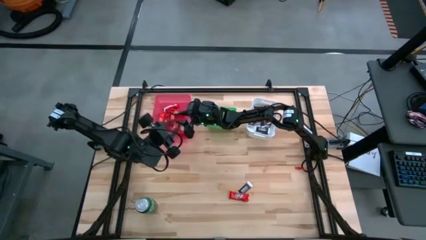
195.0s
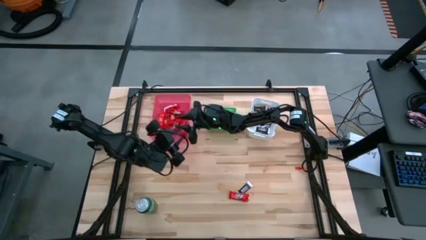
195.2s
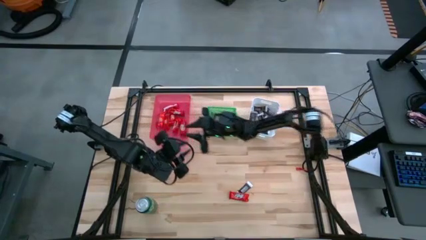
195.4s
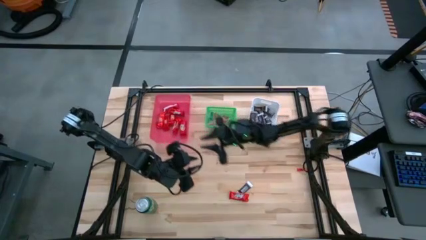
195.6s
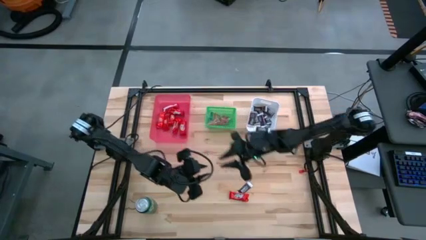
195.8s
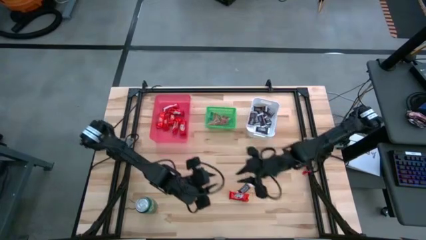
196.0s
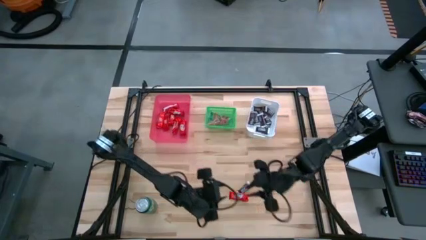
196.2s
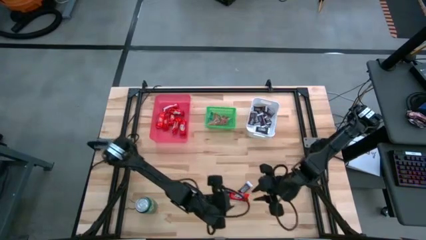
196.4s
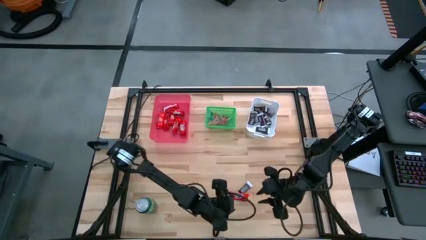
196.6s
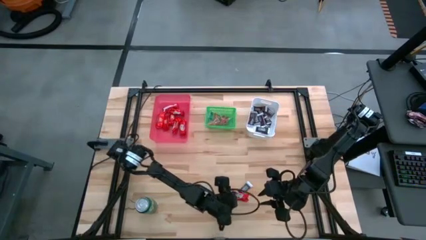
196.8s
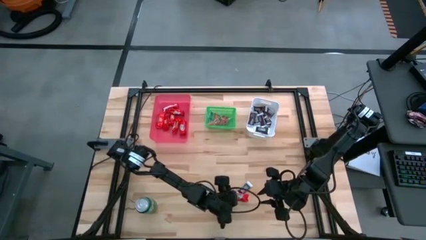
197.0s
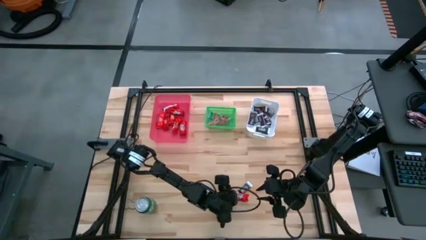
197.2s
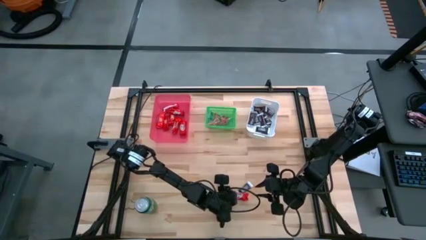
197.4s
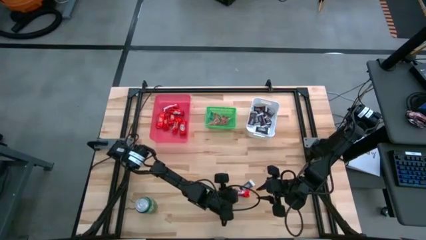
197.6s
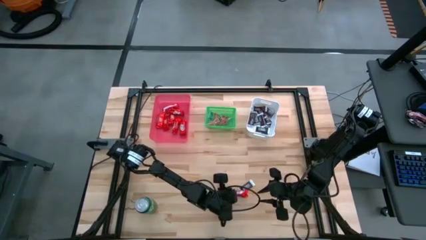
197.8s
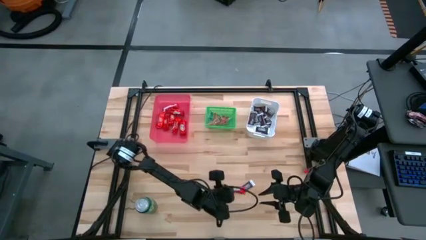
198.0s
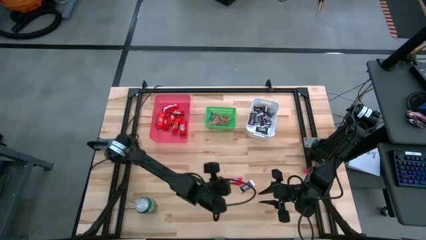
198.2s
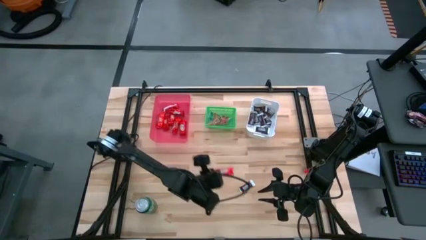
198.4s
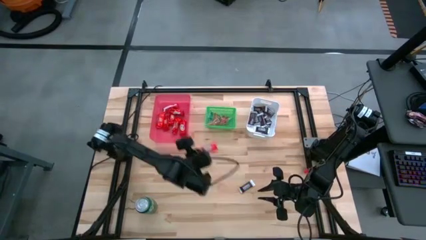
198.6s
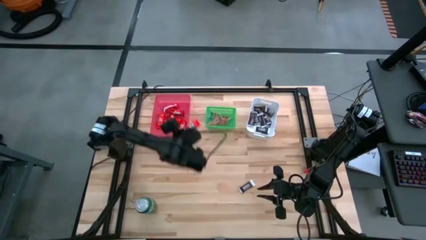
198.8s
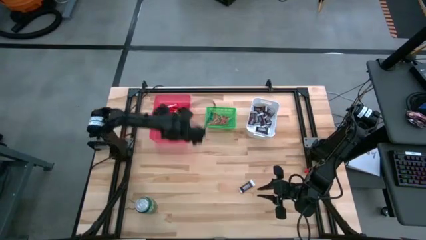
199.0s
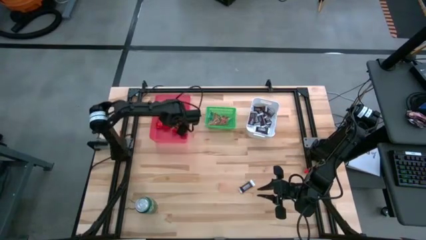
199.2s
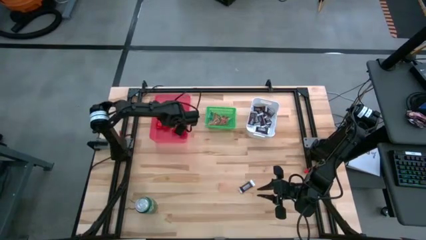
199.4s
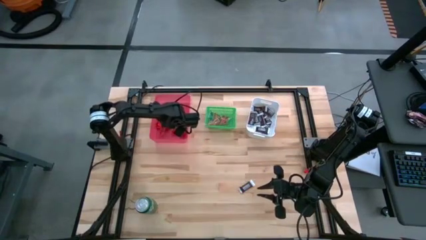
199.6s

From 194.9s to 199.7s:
Task: Sort candy
Put the red chocolate bar into the pink bin

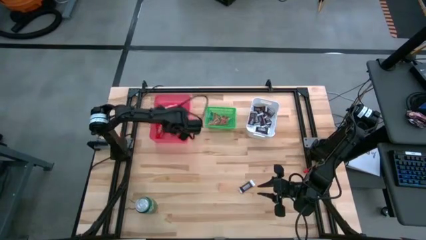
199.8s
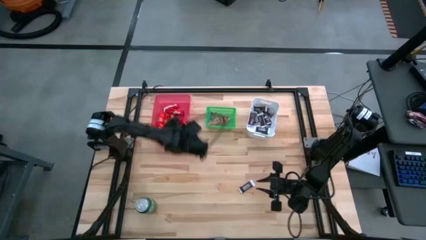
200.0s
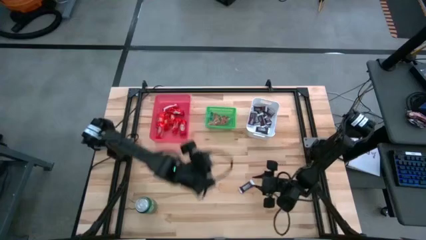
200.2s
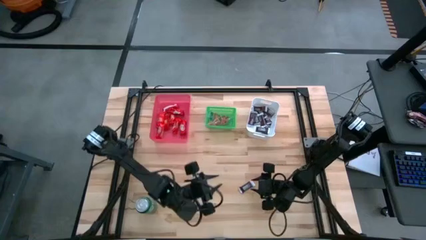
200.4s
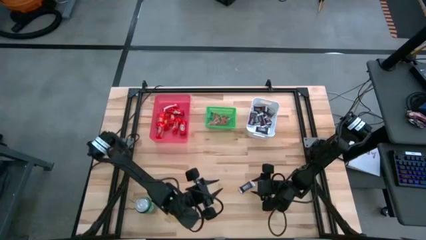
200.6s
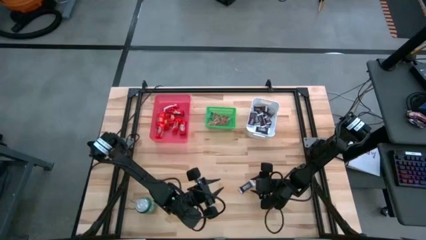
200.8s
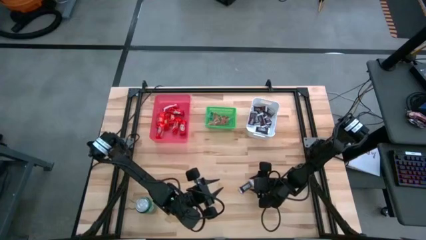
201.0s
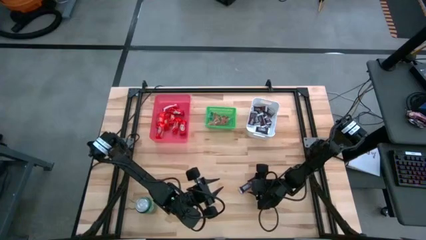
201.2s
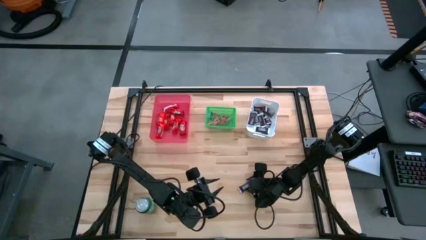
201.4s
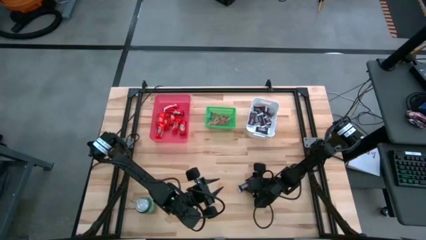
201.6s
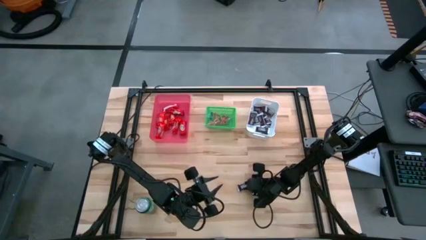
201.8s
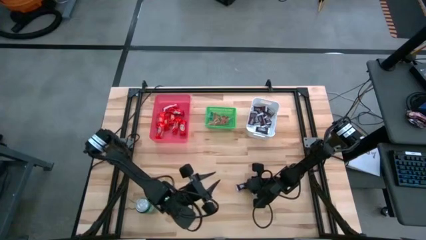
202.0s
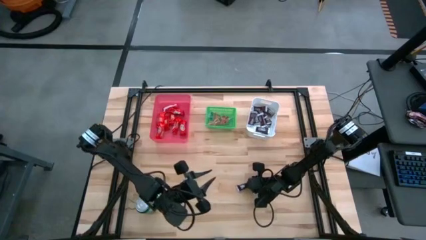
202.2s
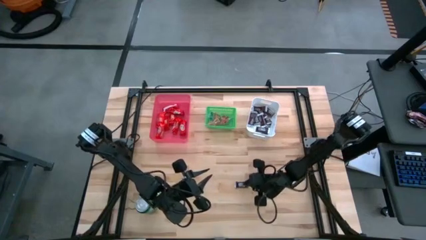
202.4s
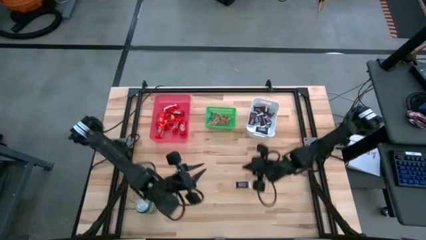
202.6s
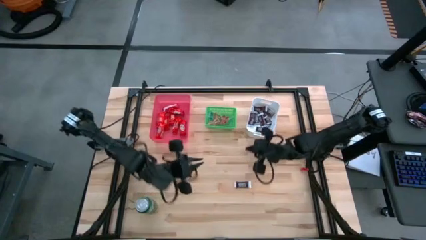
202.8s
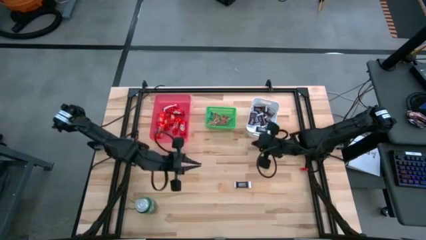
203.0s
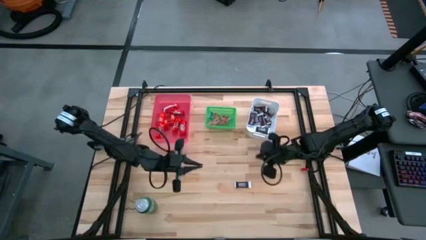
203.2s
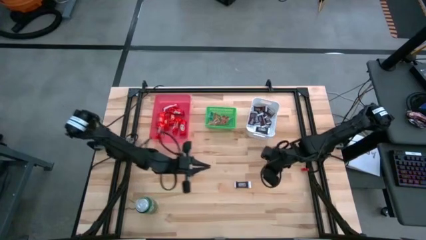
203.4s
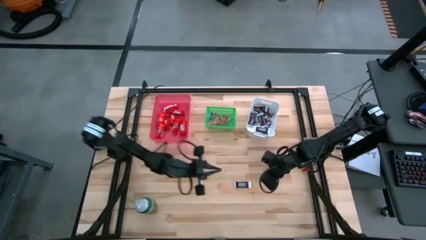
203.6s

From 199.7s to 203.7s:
Put the brown chocolate bar into the white bin

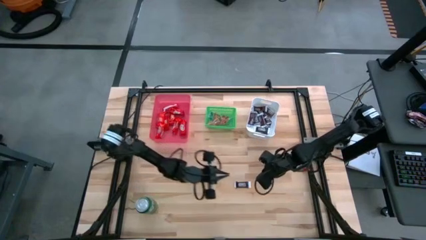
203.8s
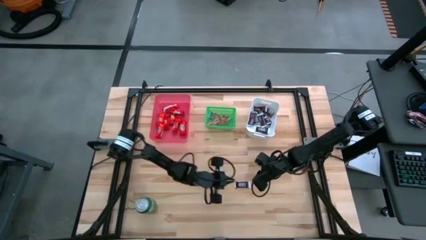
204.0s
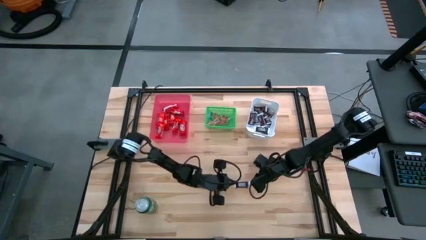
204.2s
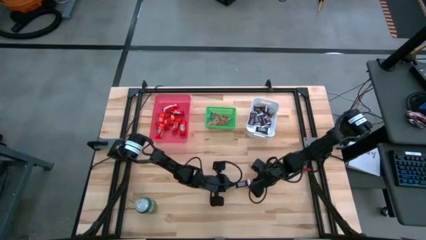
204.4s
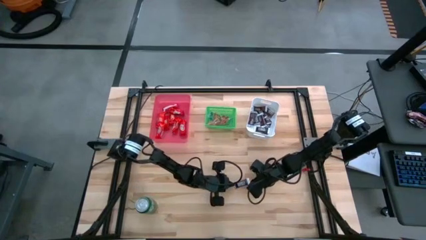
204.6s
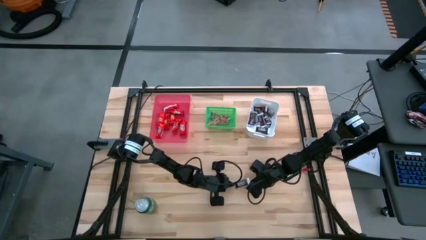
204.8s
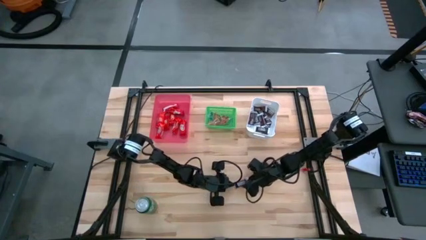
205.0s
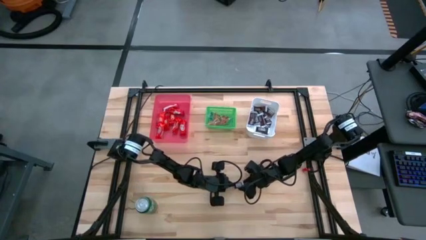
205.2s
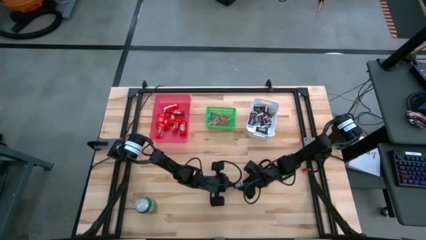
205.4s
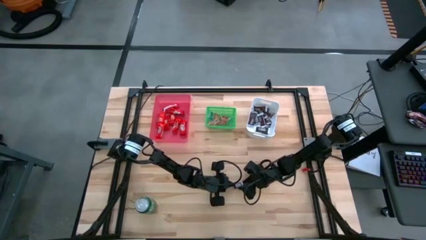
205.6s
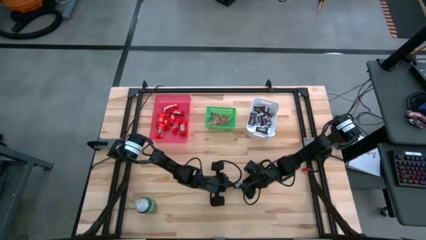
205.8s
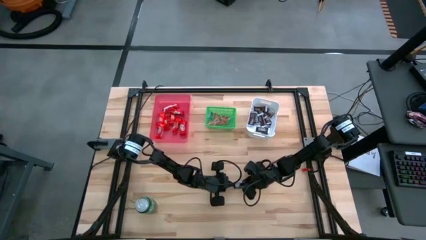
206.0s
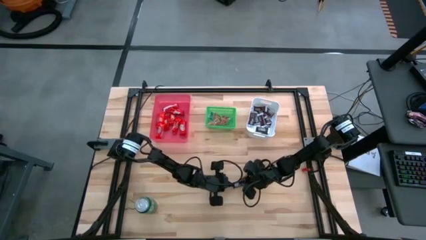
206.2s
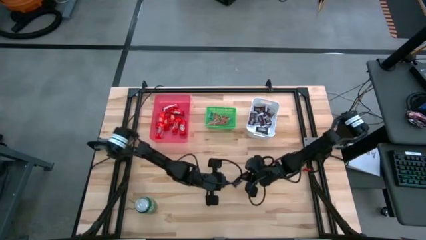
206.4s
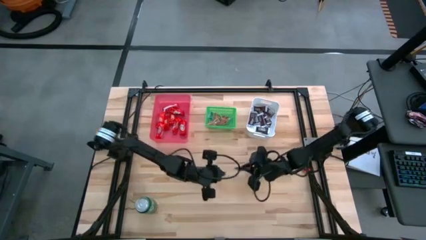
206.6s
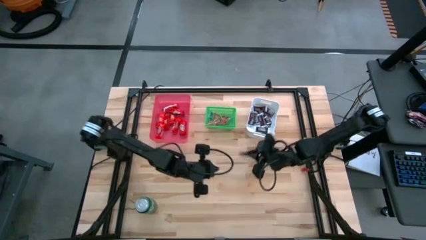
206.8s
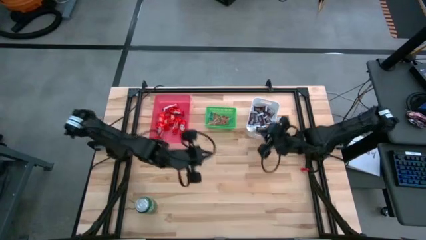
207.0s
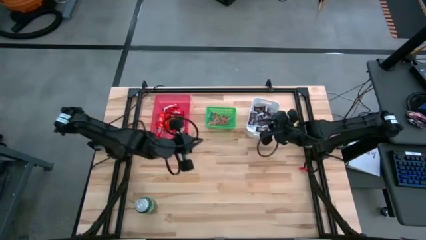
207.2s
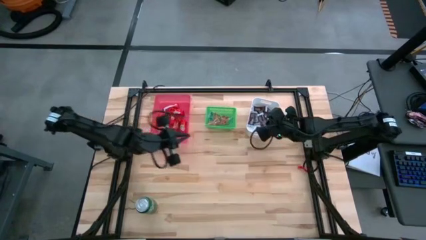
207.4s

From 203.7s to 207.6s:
Put the brown chocolate bar into the white bin

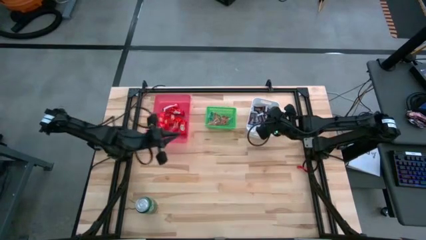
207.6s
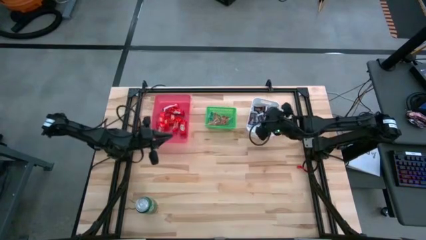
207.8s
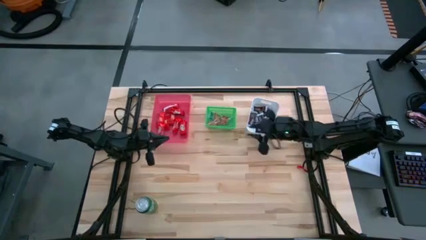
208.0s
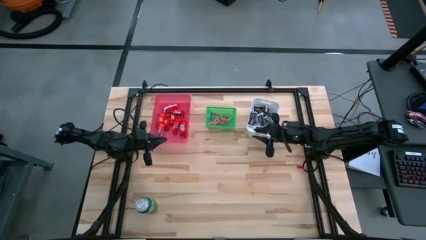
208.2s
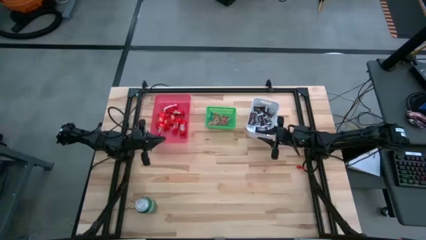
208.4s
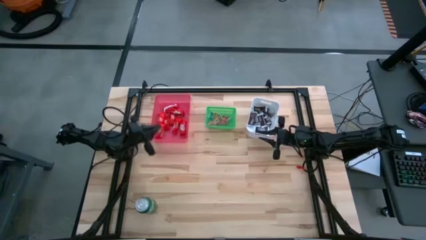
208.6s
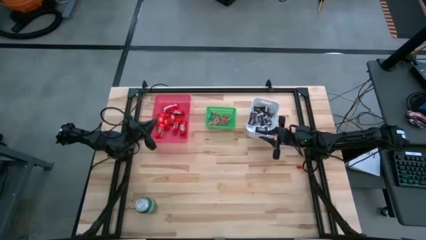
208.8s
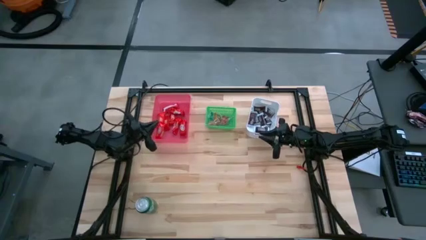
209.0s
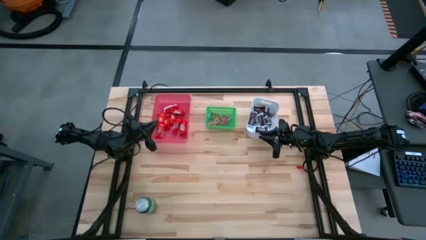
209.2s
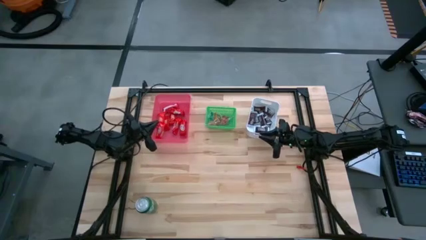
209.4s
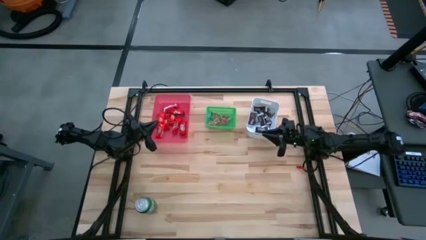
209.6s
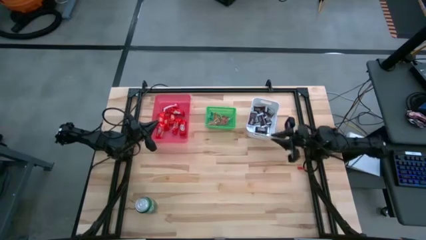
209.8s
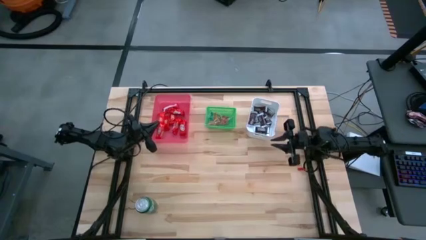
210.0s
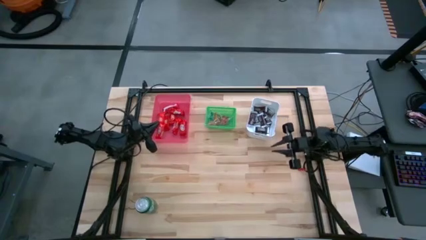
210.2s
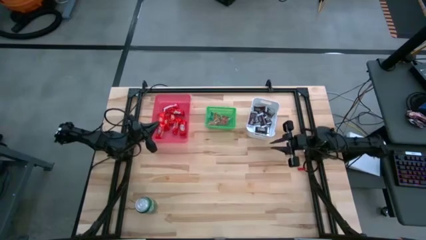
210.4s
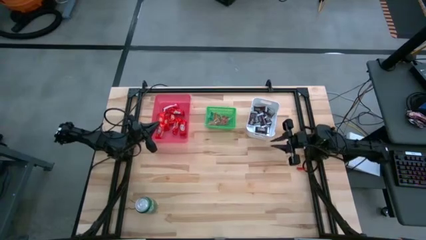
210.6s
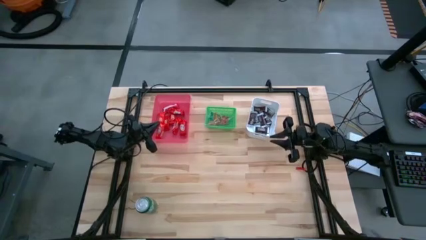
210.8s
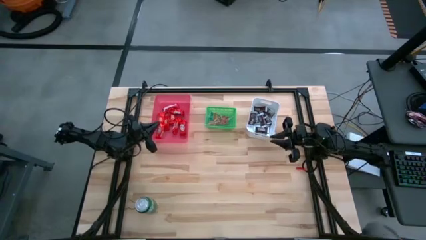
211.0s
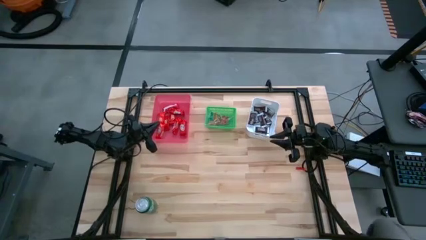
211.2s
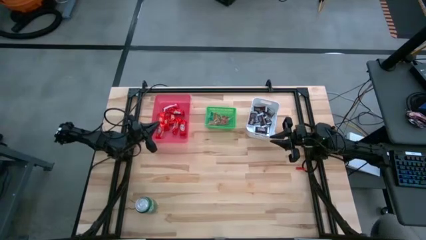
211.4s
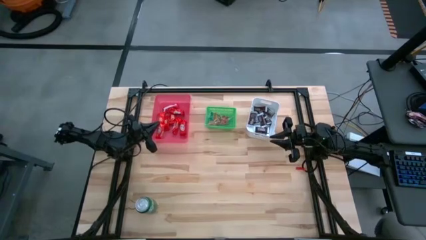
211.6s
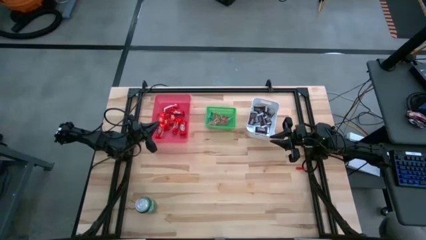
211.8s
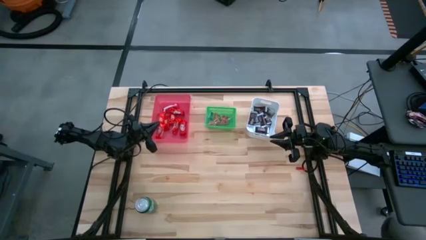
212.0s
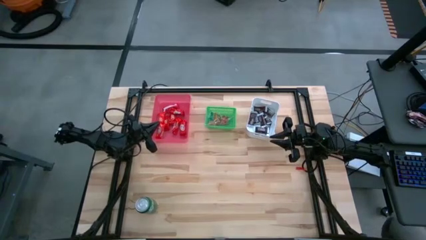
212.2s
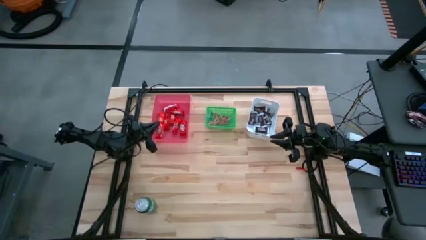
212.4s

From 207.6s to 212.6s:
Return to Home Position
